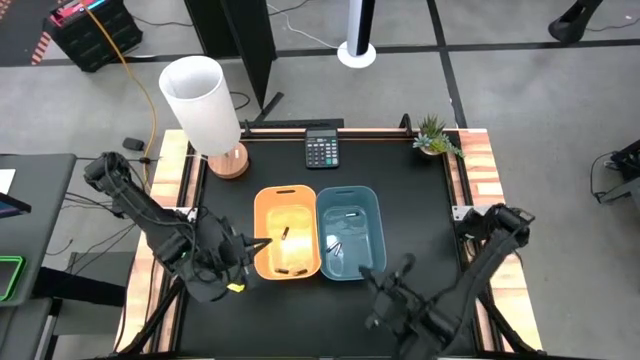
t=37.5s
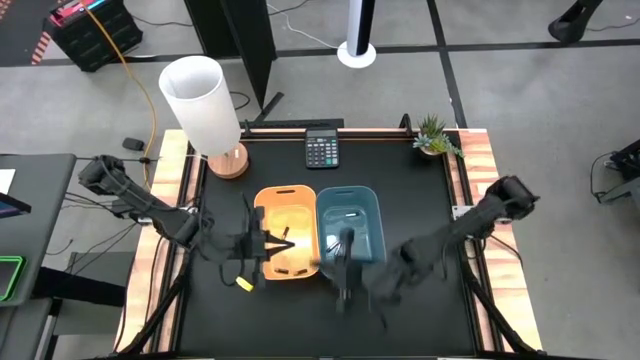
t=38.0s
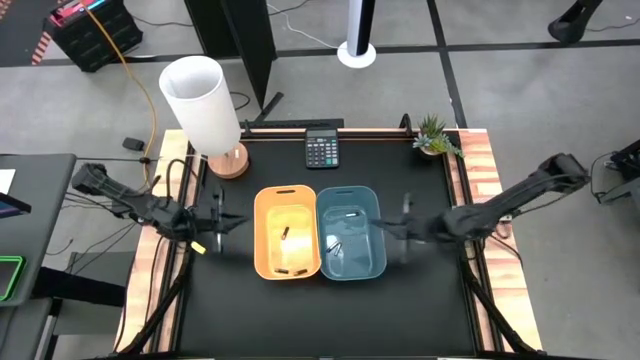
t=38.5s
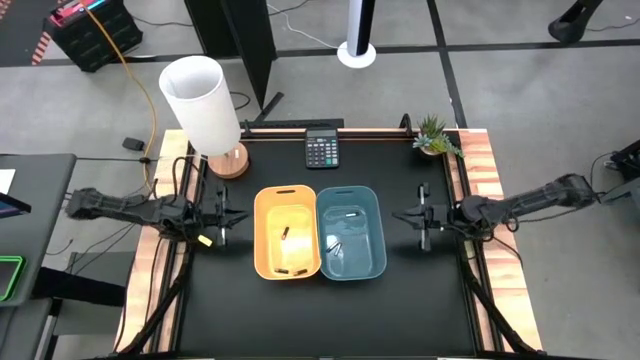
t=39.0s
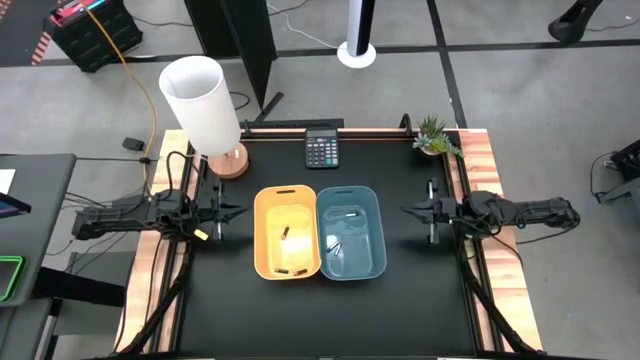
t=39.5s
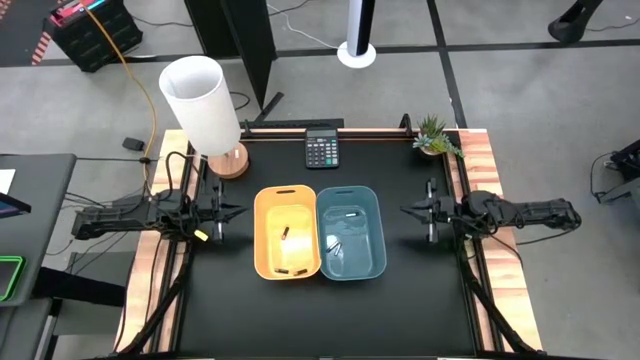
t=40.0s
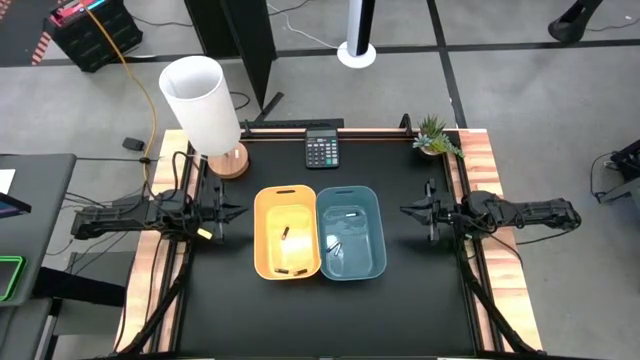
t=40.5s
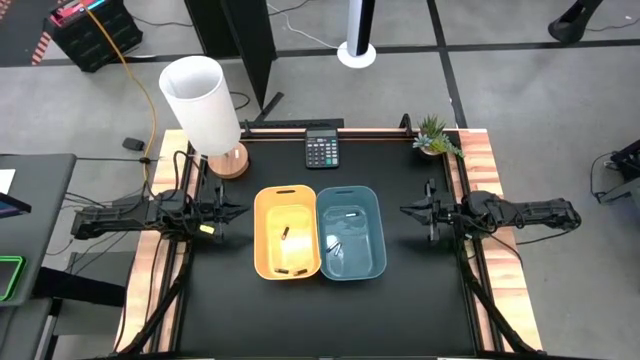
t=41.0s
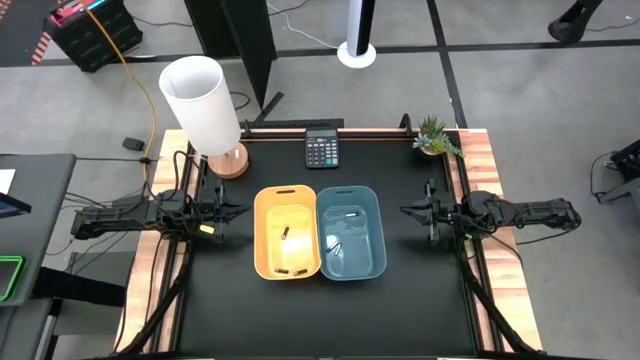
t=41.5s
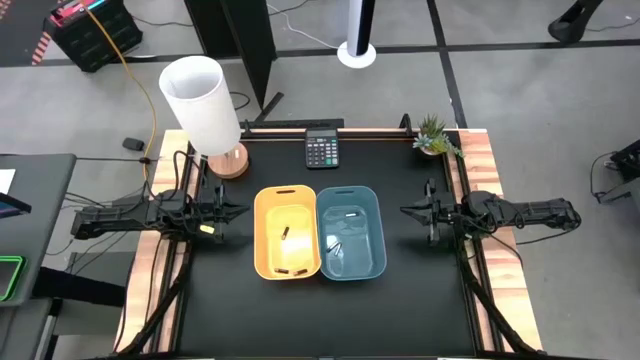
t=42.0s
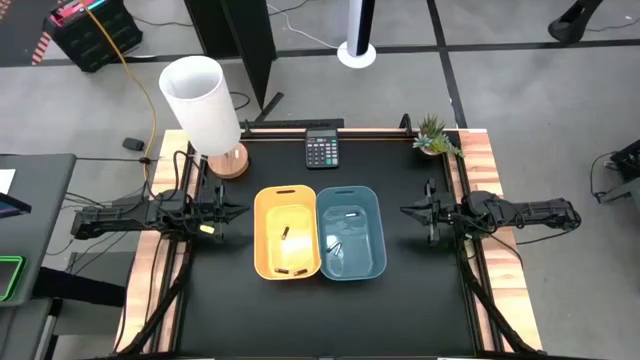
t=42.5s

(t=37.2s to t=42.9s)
Task: Sort batteries
Return to Home Position

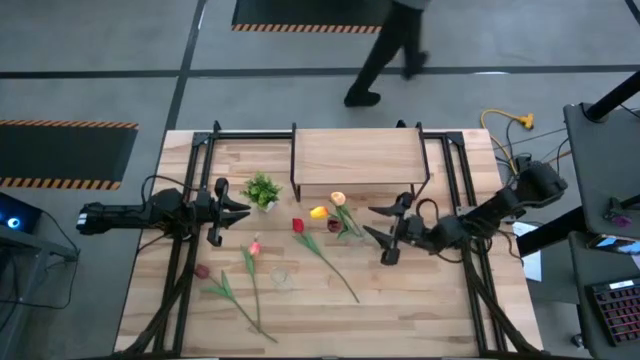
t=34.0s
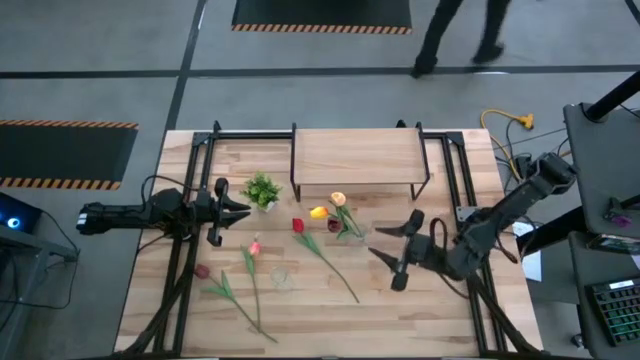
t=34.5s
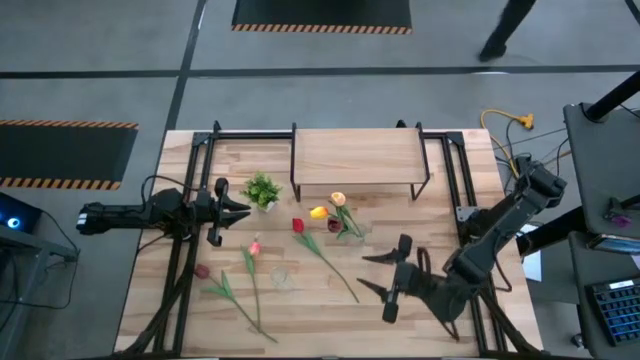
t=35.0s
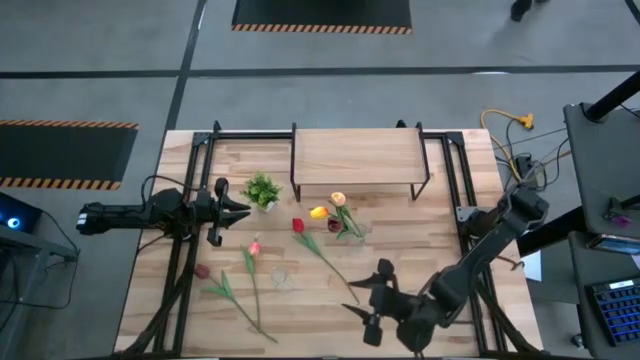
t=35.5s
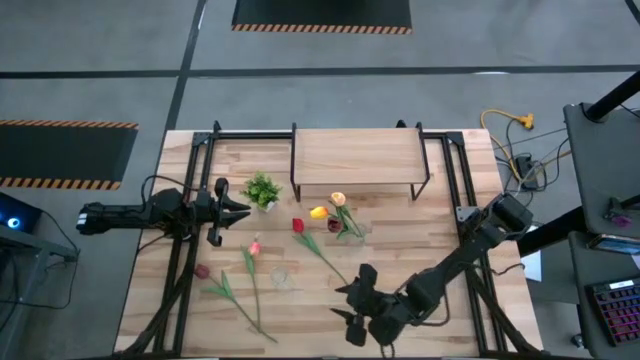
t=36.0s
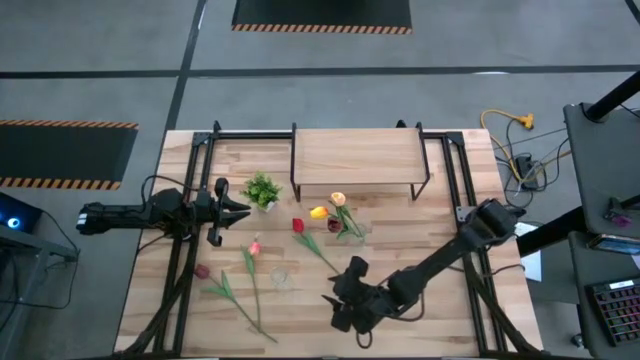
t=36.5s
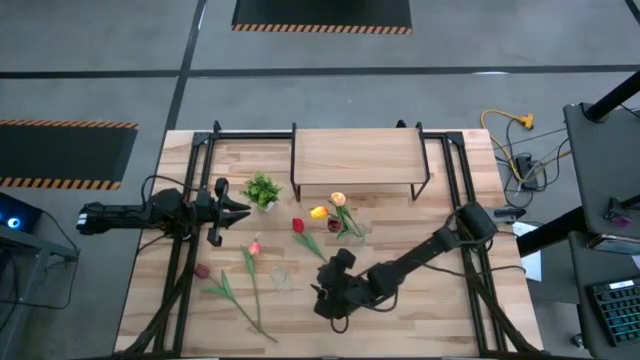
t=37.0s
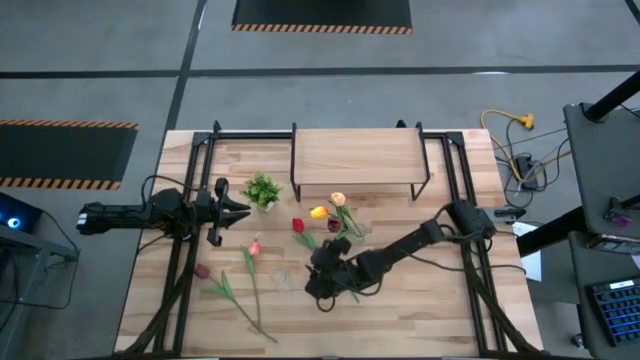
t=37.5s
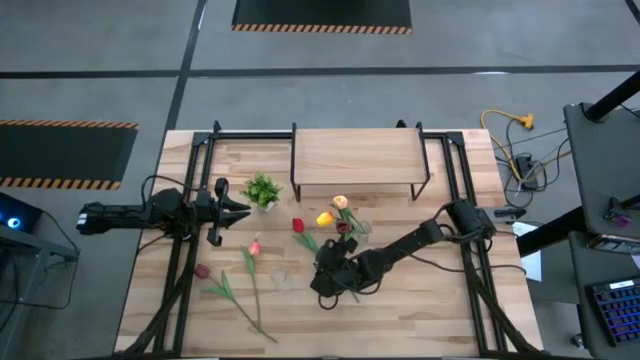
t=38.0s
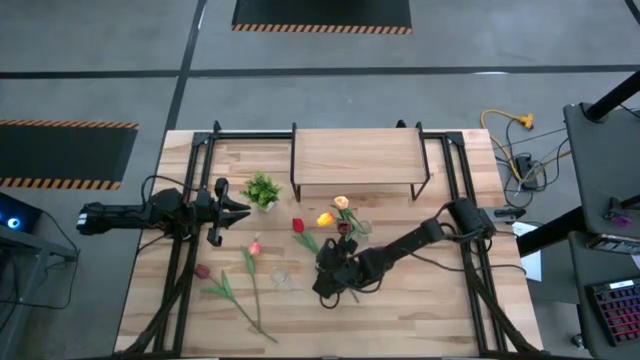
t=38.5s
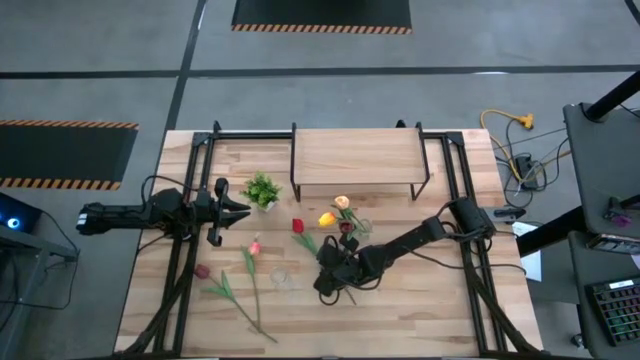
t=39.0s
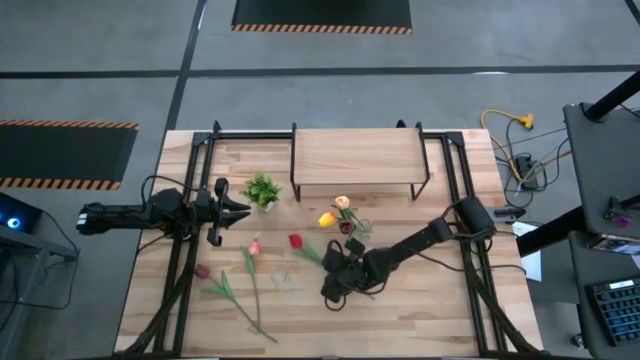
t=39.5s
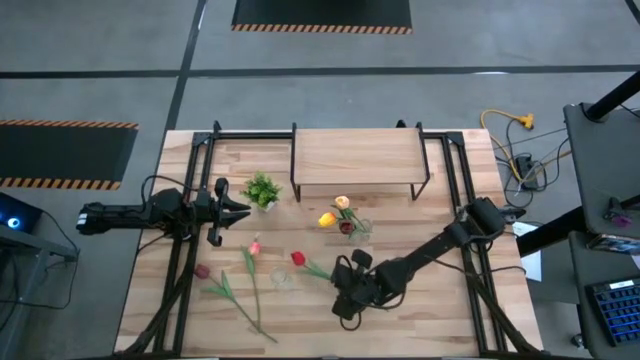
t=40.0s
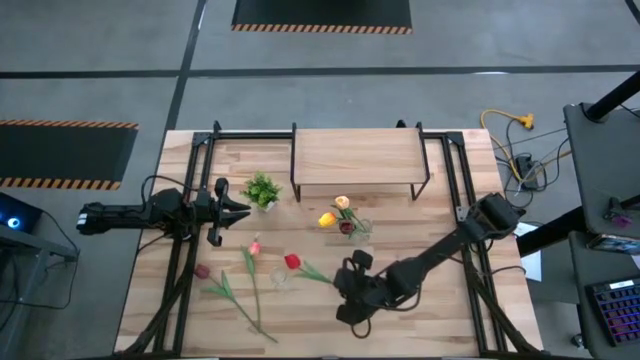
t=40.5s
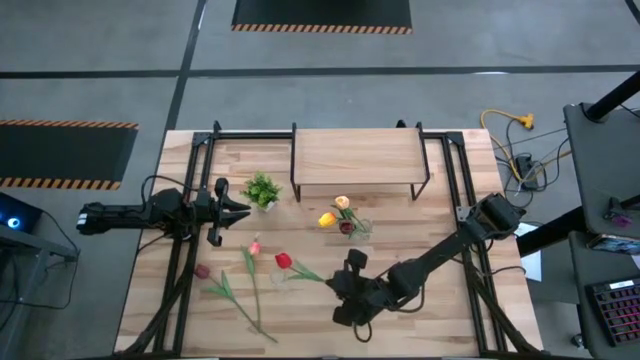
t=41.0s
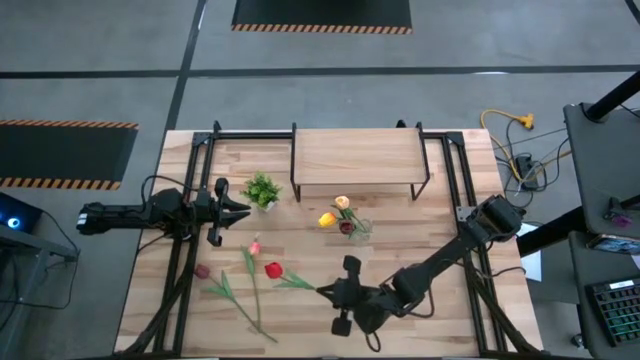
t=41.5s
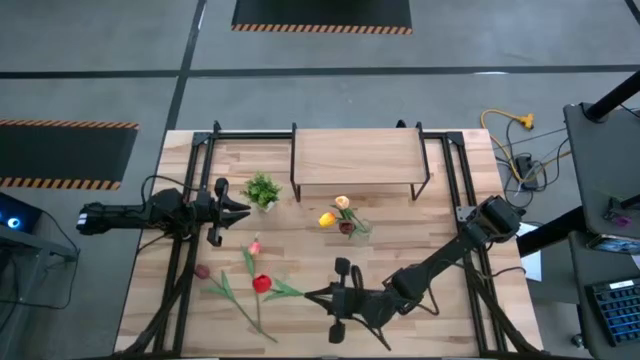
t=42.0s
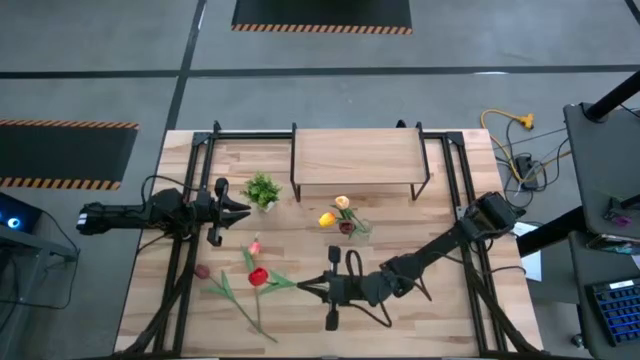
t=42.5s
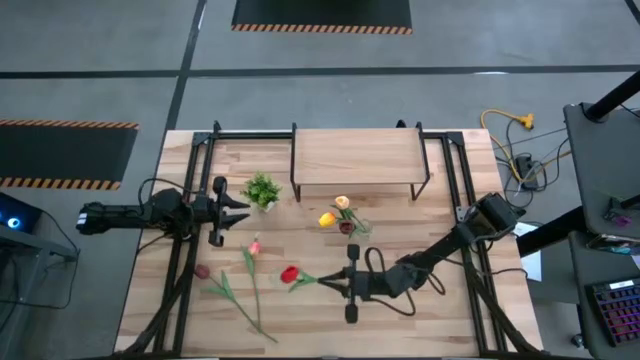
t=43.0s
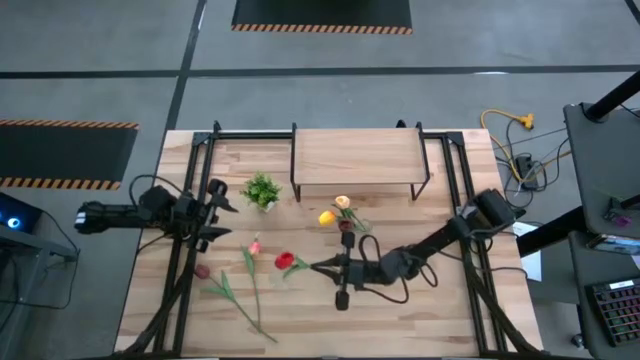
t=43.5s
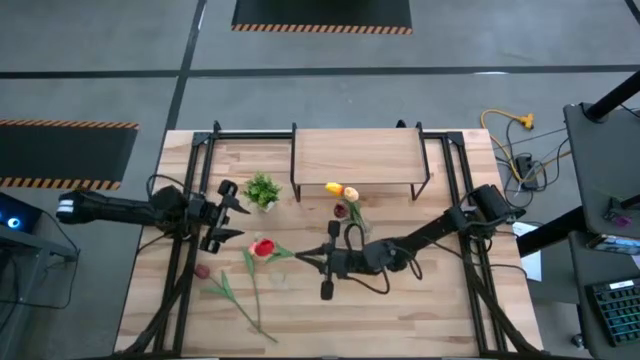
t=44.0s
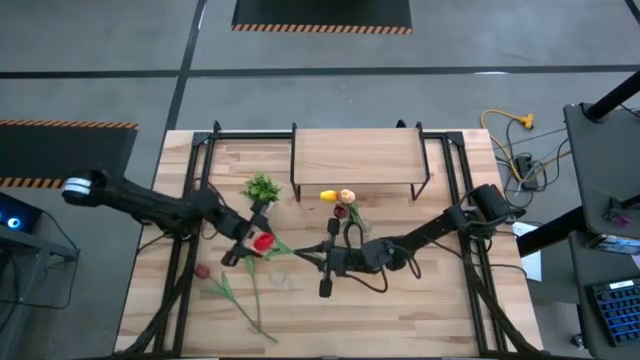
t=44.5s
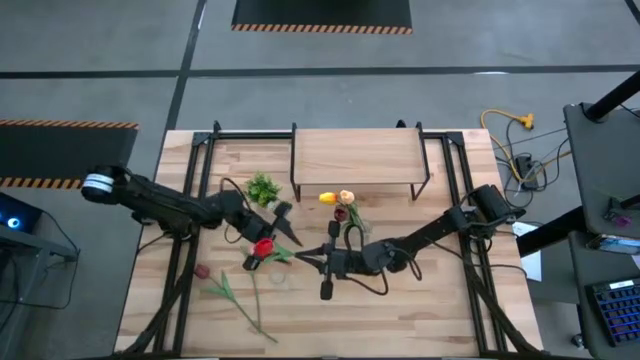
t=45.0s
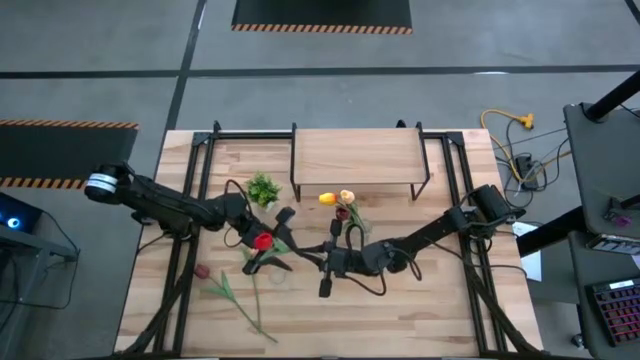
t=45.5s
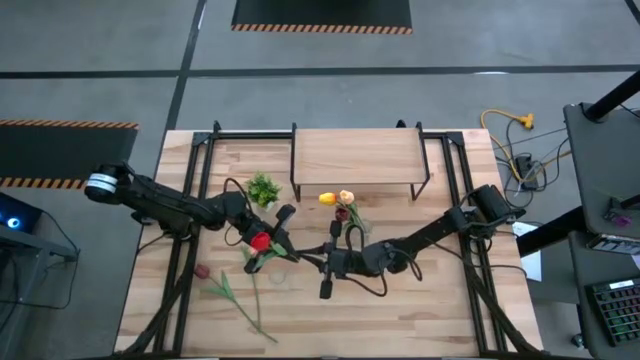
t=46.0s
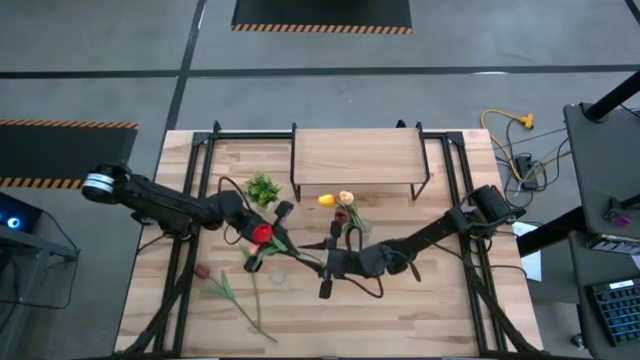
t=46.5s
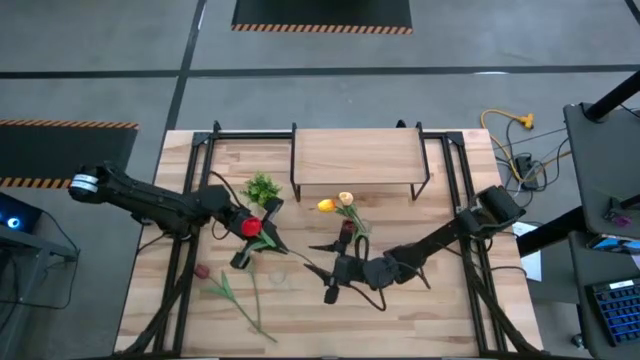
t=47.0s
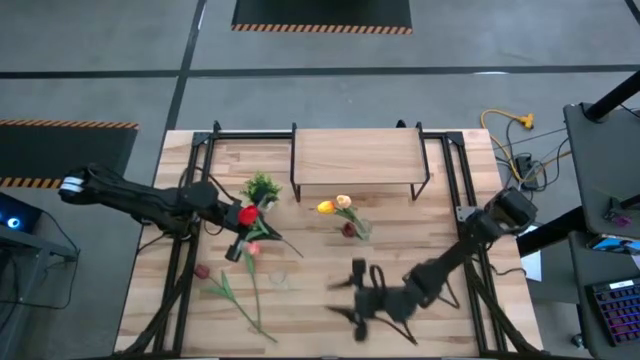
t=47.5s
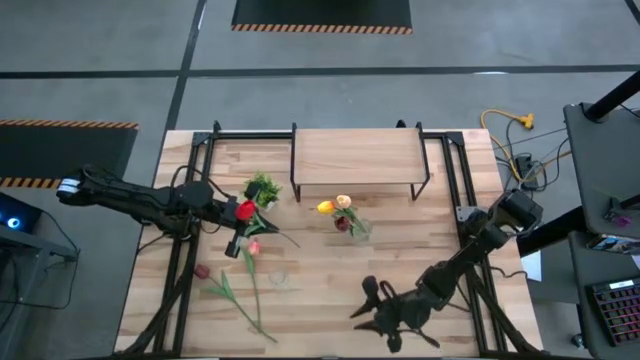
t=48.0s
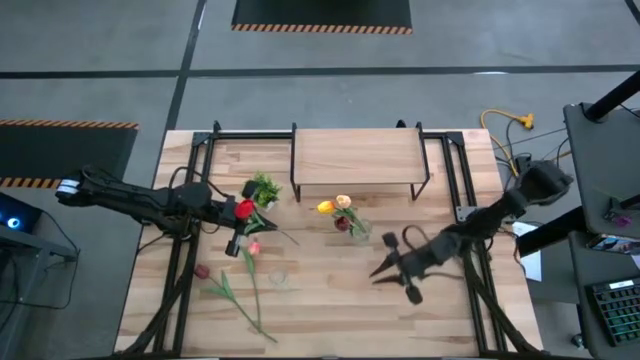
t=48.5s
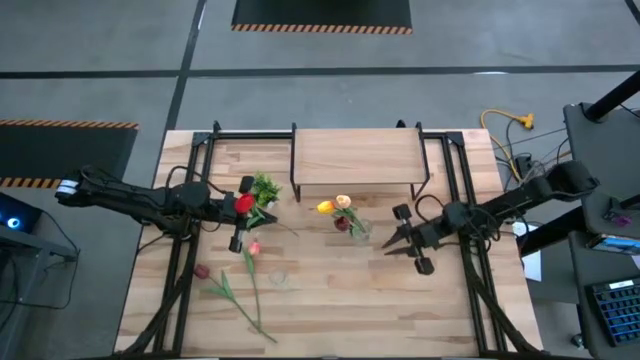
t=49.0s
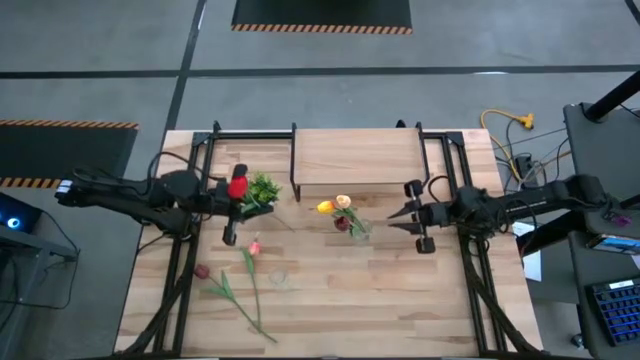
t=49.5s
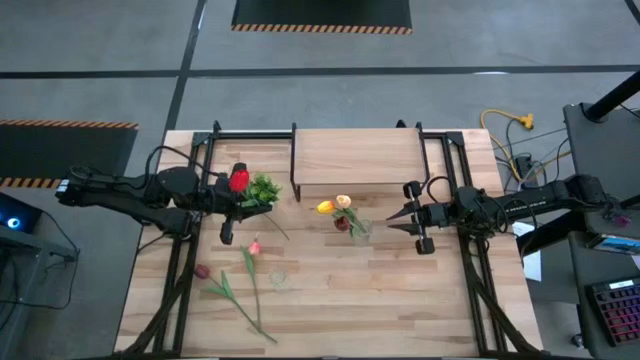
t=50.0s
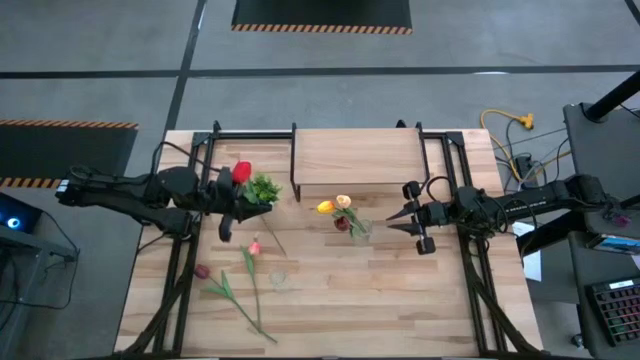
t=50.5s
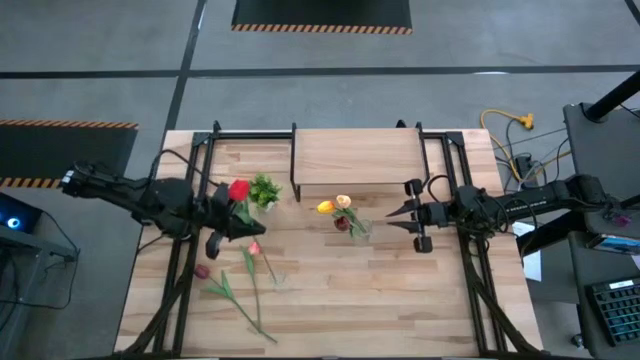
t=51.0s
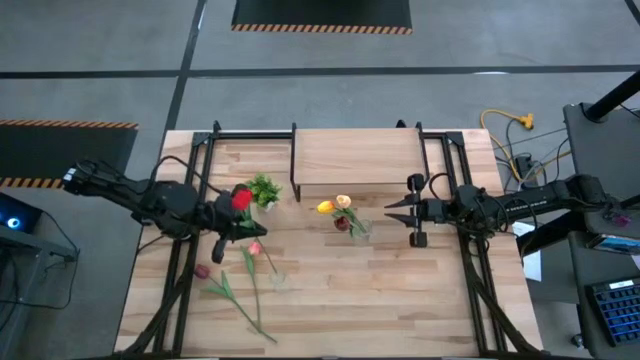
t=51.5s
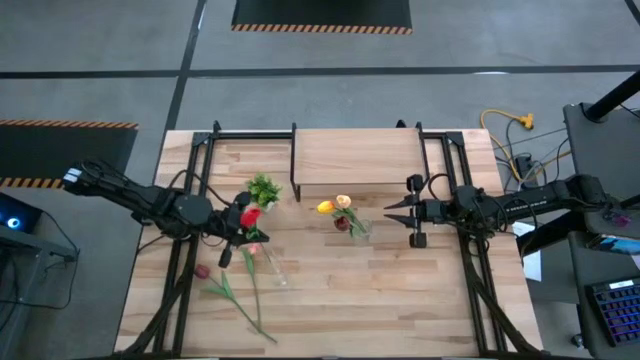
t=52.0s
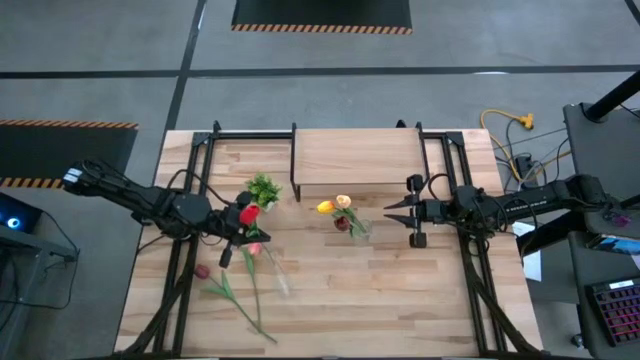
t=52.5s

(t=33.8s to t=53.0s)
Task: Pick and place flowers into a vace then onto a shelf
Put the red tulip into the left transparent vase
